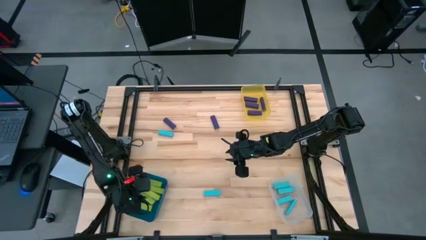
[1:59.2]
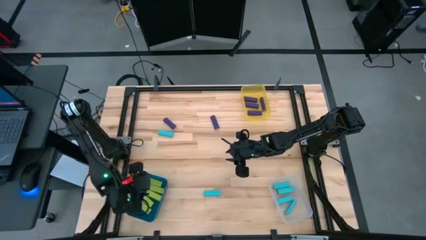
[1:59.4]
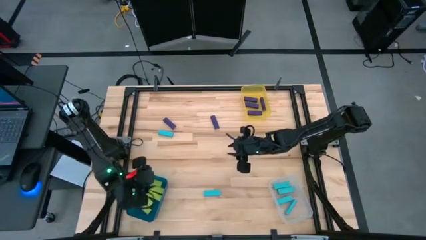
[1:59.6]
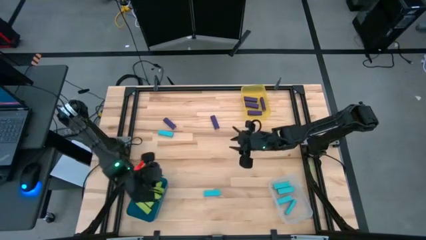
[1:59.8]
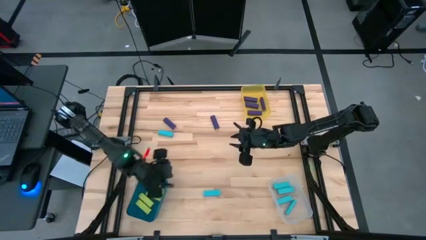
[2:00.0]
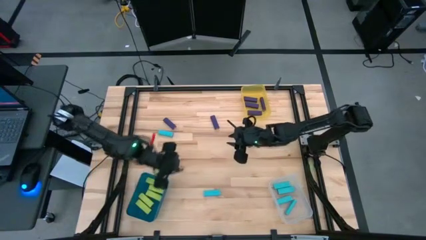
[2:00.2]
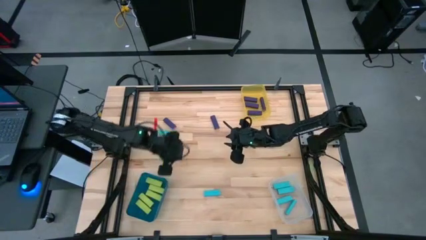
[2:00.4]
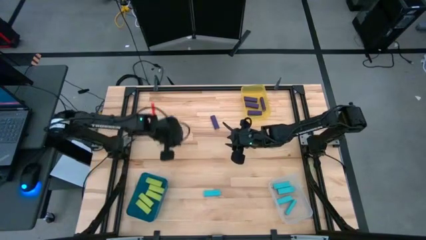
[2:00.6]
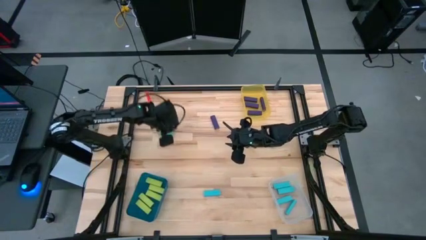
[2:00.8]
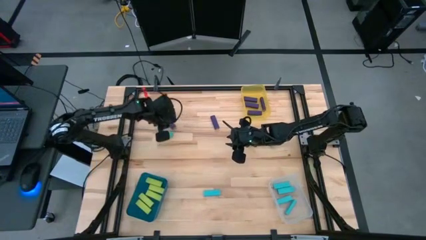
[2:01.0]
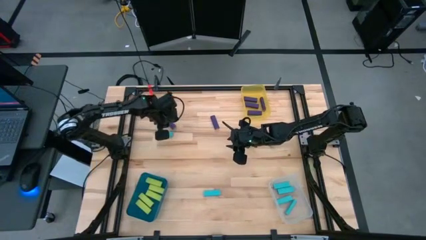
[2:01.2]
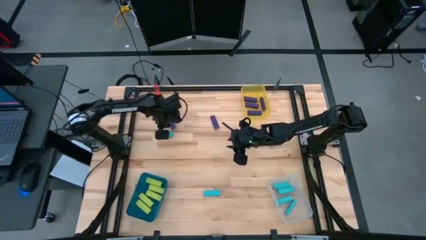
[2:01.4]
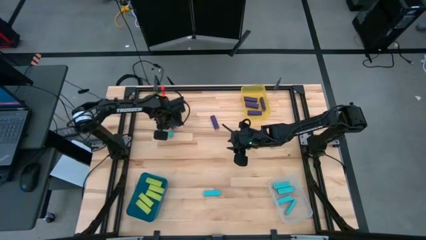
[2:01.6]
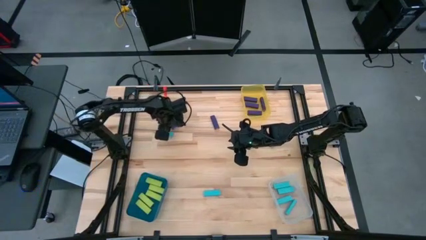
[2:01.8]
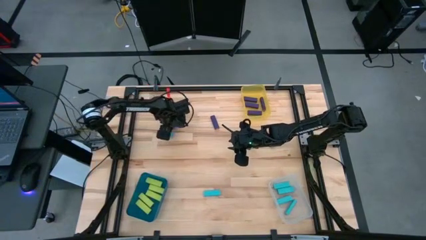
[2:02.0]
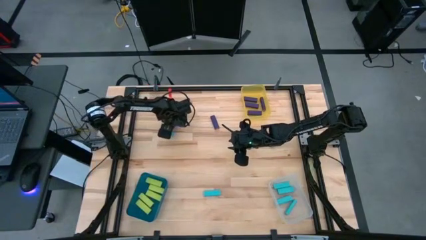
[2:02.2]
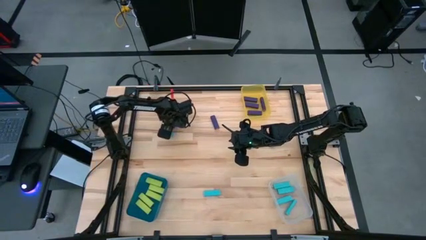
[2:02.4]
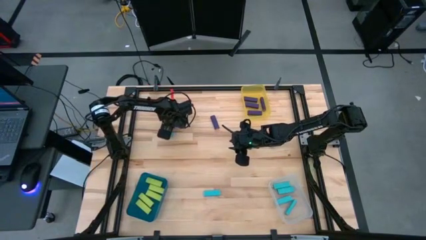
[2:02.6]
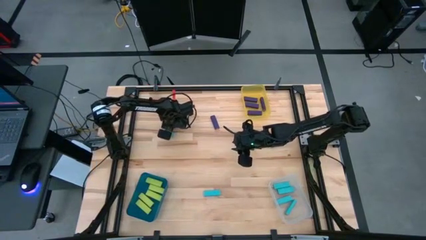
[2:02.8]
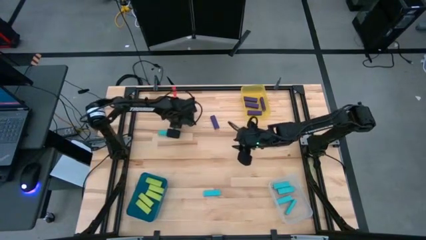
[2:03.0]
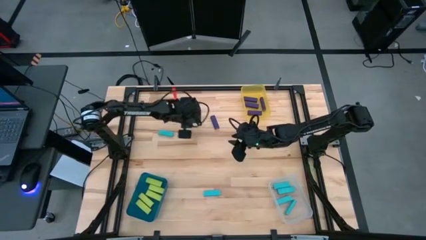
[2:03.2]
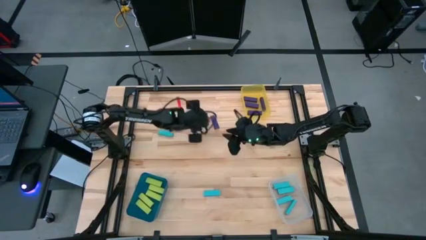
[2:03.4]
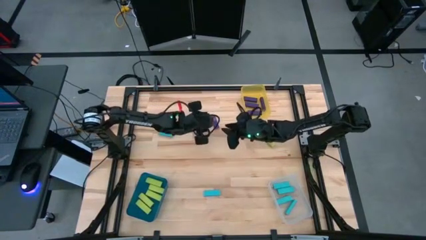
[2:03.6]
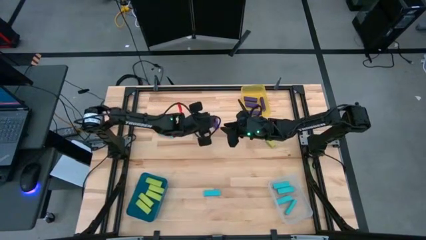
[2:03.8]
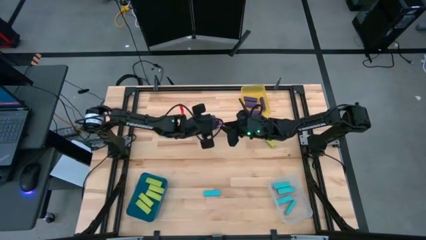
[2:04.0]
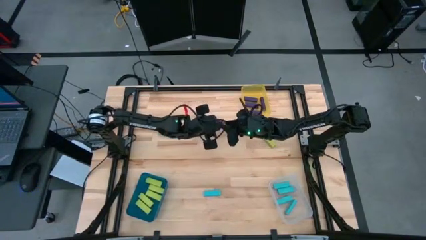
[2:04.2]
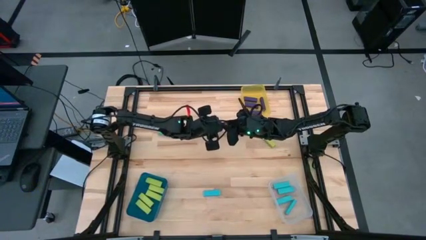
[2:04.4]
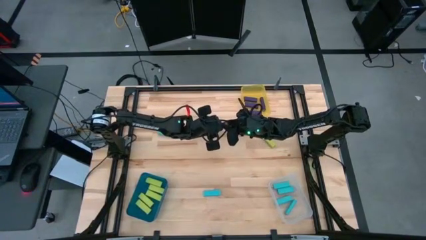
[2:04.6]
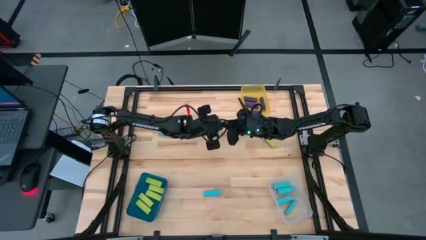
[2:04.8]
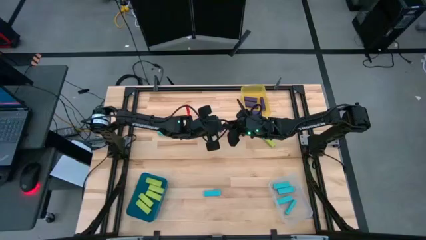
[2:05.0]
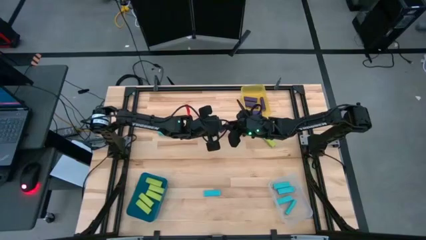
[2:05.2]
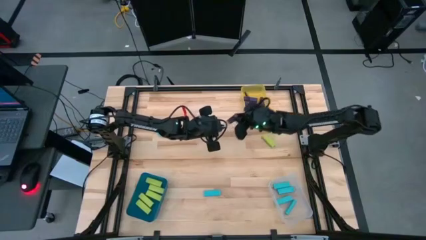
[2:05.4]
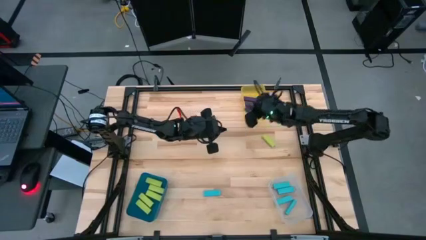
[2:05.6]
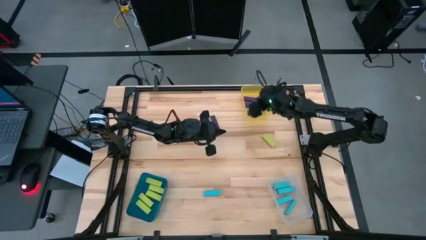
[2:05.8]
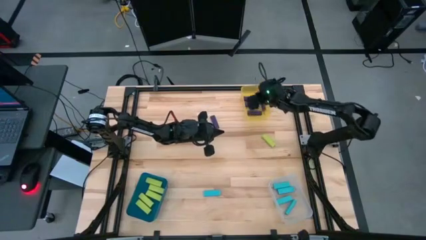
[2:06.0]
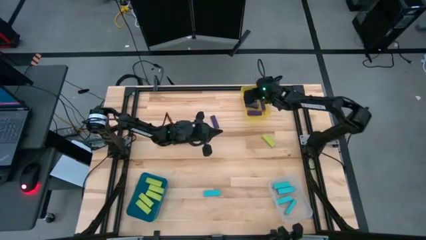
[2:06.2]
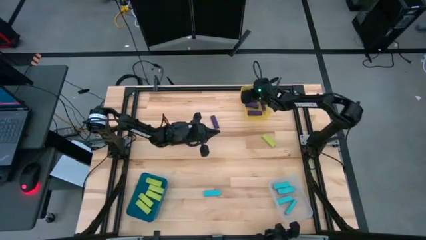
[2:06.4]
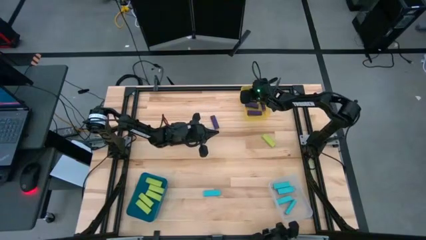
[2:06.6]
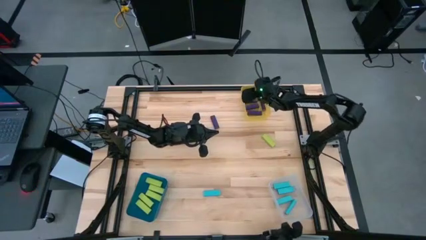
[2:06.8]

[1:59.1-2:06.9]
Task: Sort blocks
Put the violet block into the transparent yellow bin

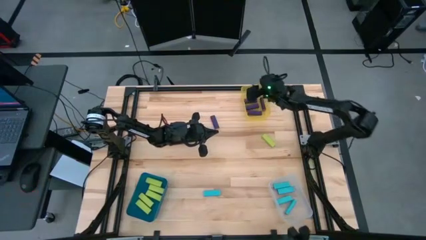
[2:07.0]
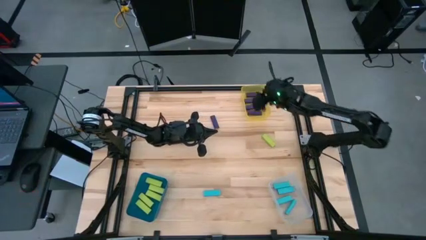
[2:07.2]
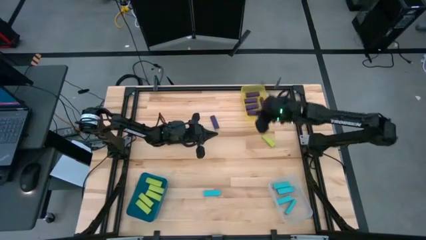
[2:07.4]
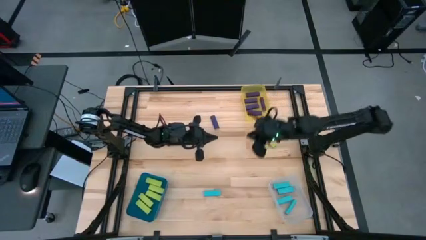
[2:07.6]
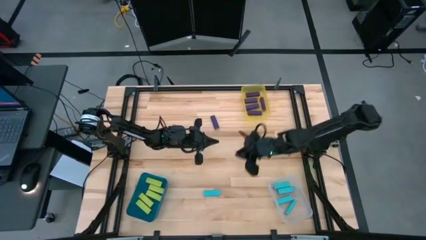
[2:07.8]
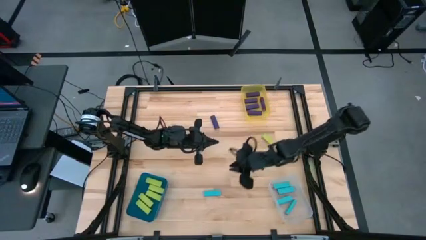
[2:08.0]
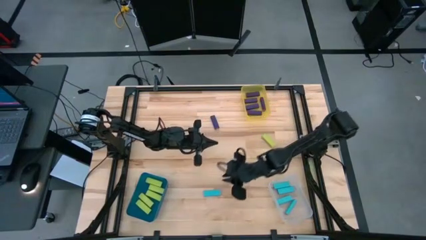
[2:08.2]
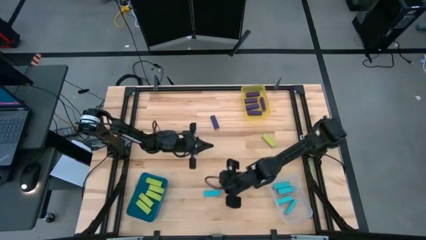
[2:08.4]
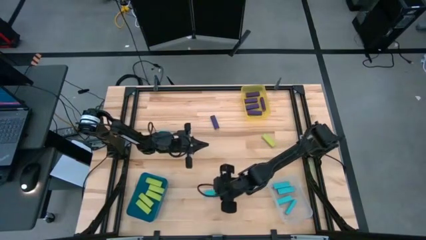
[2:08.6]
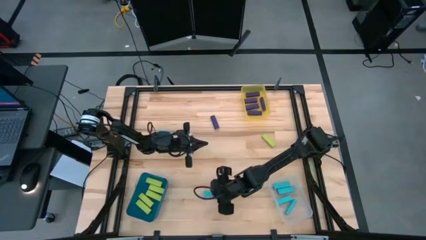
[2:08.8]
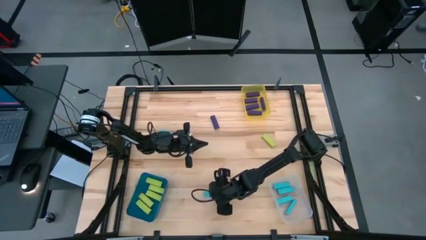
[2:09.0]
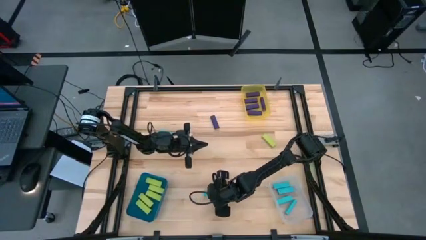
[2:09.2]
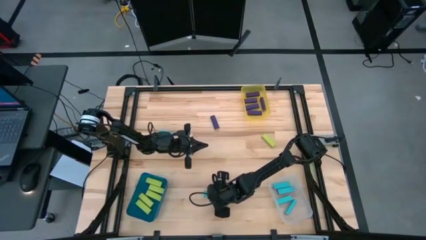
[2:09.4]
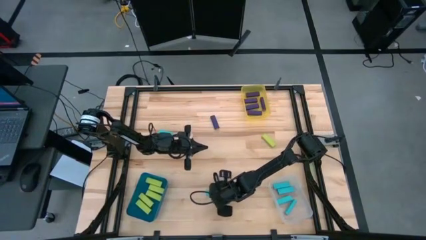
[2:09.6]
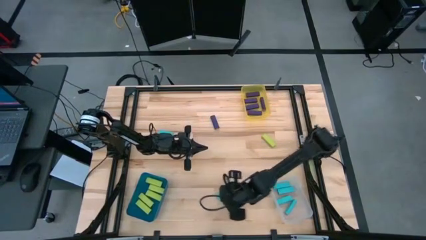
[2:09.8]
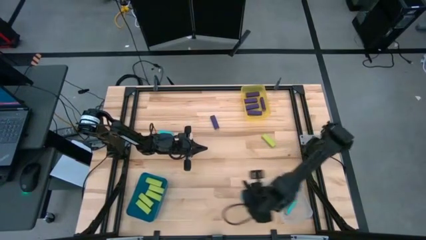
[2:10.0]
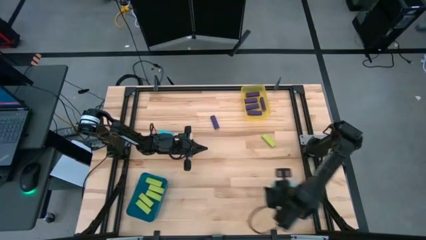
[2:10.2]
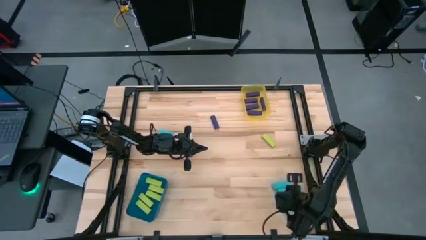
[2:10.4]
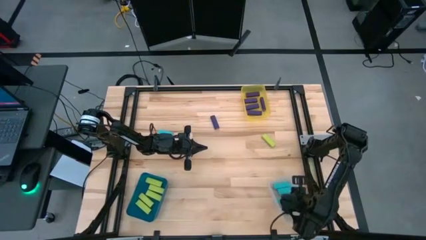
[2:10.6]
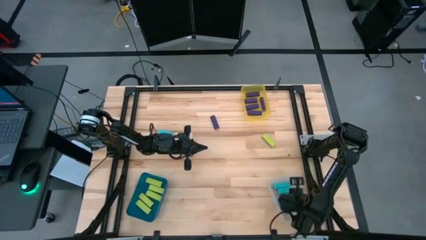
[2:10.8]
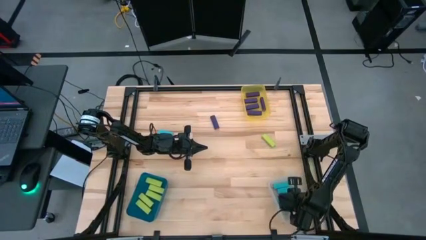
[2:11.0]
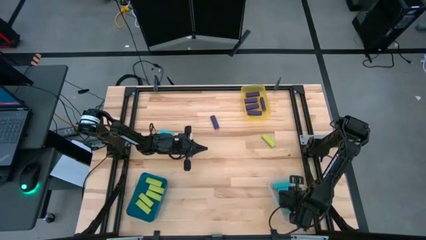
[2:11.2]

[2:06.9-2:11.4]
Put the light blue block into the transparent bin

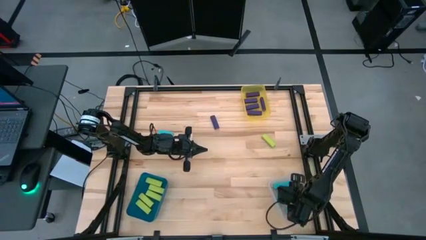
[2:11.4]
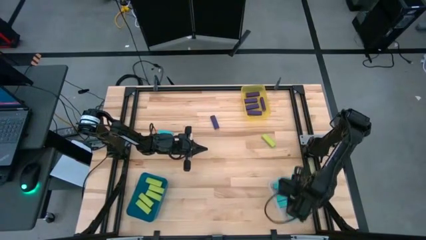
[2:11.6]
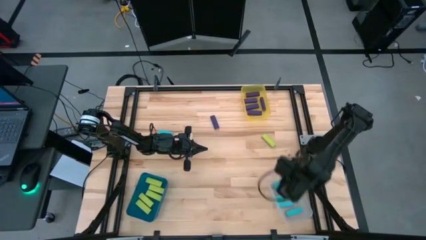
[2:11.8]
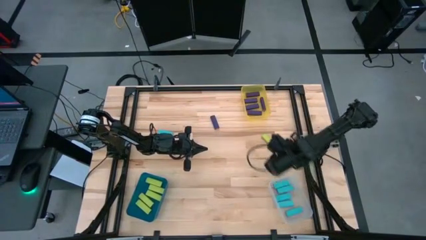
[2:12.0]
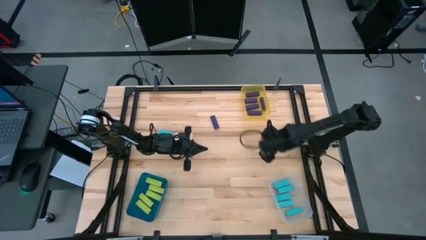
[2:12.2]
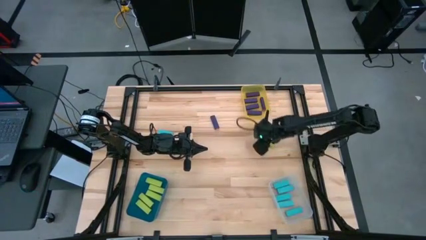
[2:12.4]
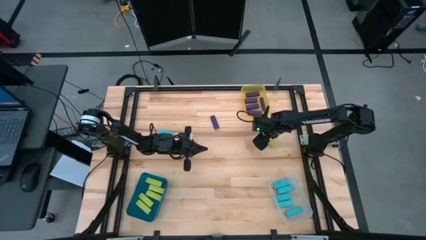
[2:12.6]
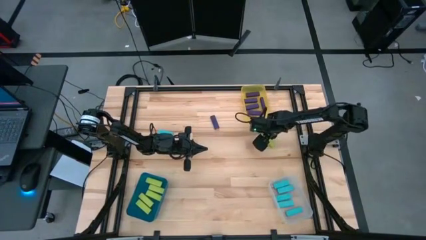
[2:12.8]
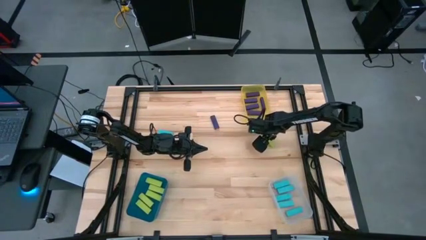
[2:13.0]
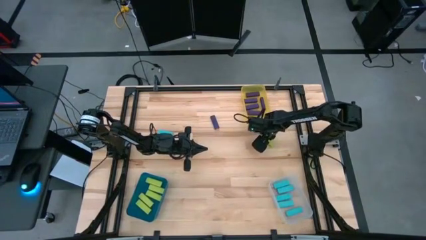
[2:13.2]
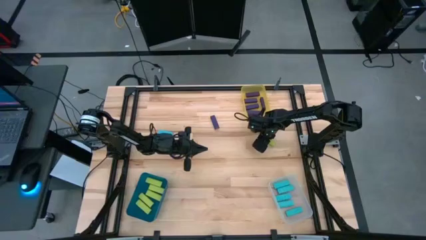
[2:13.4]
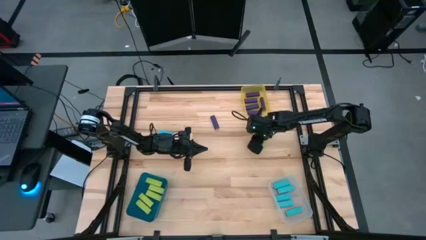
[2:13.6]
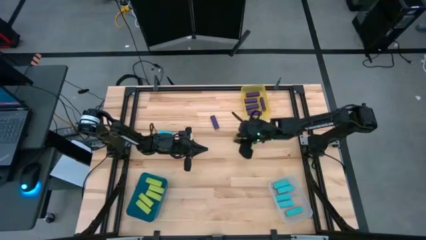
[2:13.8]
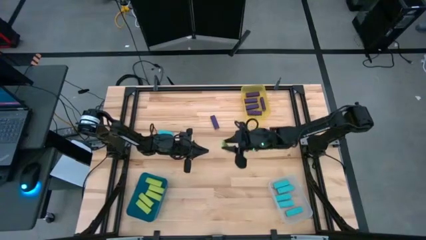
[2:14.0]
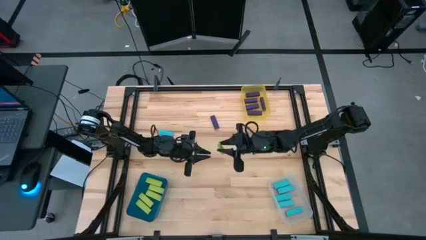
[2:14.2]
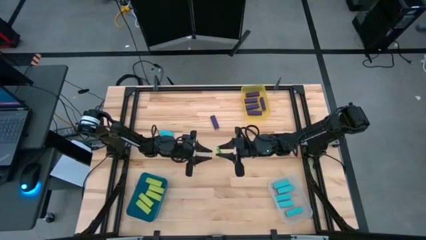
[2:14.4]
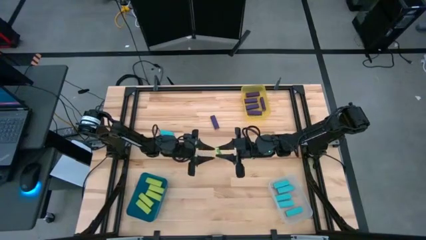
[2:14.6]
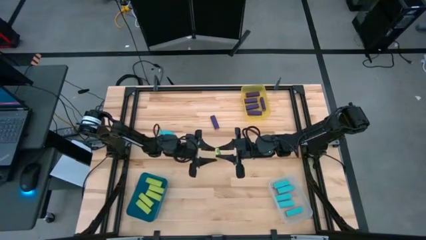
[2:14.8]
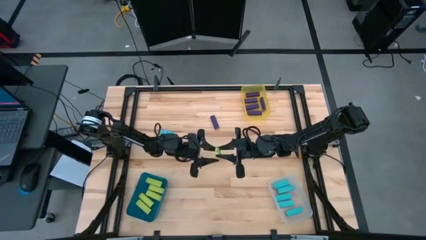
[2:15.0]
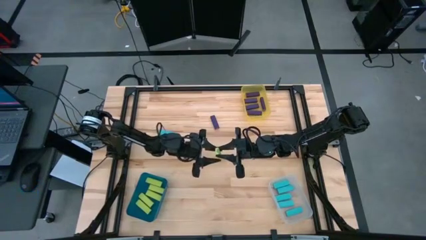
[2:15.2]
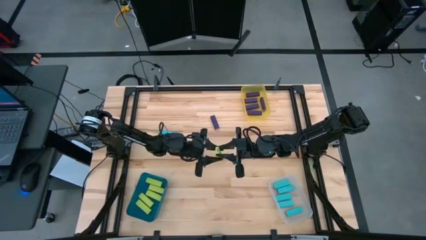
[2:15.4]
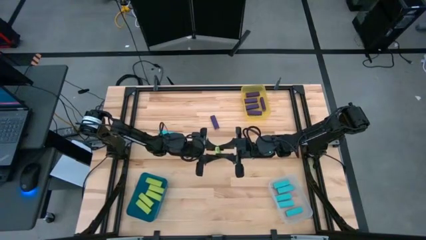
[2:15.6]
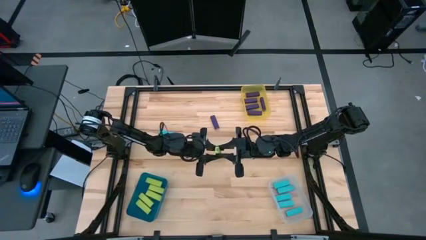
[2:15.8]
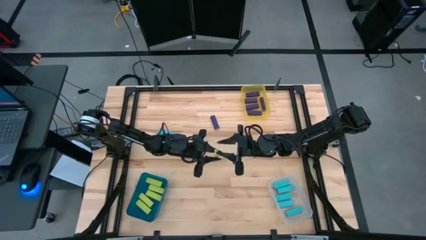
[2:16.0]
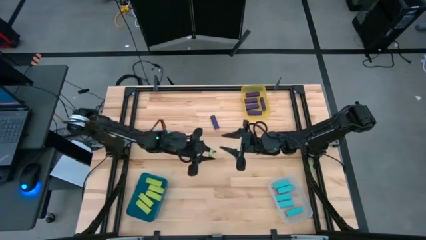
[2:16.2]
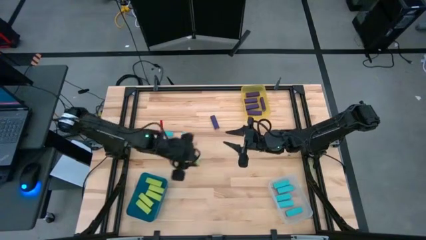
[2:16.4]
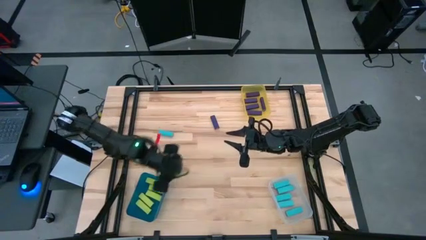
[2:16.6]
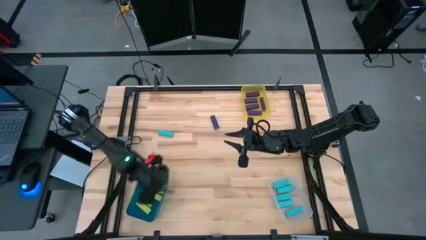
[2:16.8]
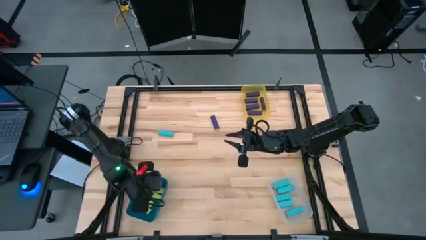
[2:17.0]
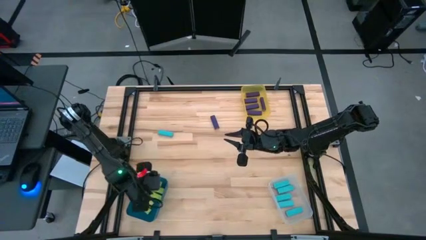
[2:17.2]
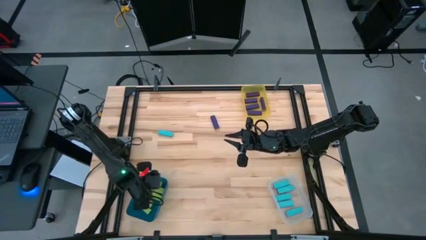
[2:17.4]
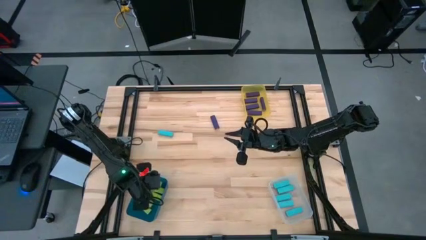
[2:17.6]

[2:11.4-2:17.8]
Put the green block into the blue bin
